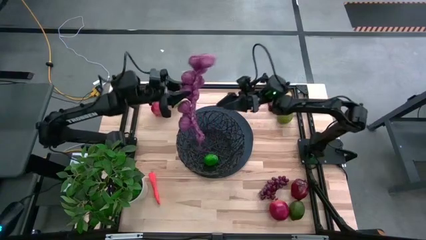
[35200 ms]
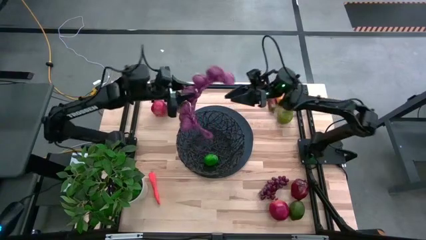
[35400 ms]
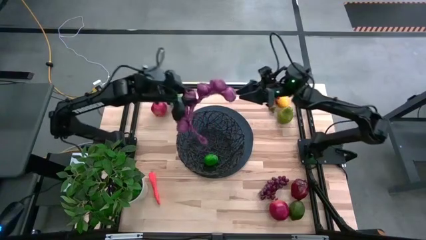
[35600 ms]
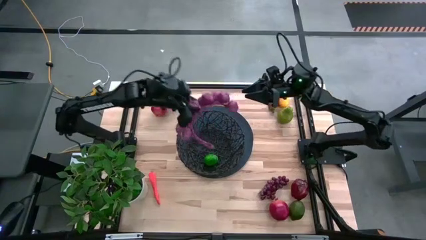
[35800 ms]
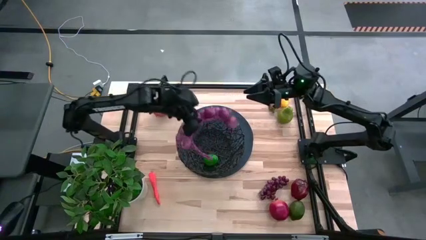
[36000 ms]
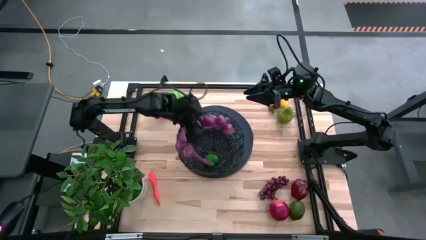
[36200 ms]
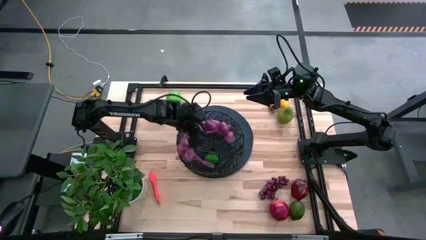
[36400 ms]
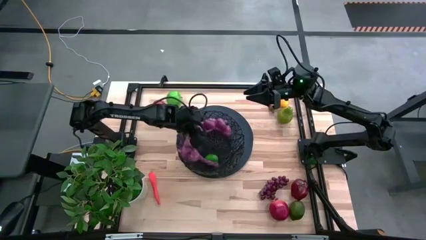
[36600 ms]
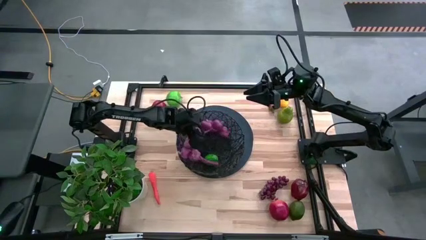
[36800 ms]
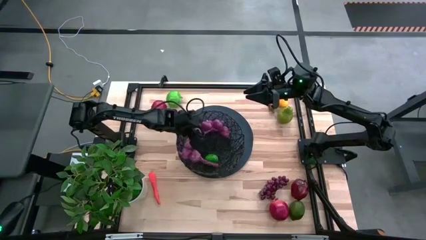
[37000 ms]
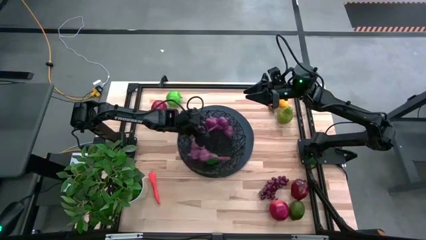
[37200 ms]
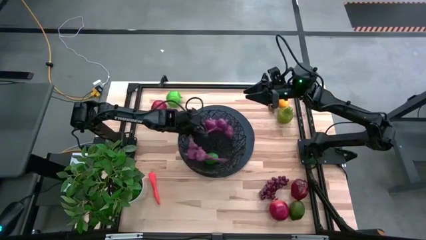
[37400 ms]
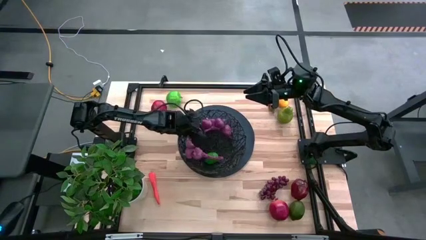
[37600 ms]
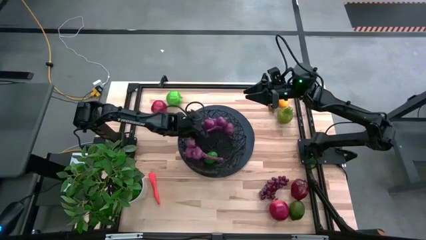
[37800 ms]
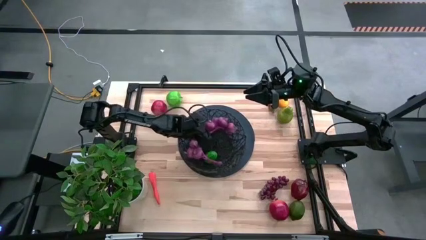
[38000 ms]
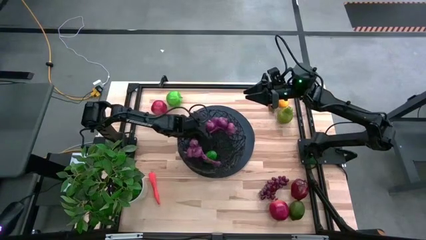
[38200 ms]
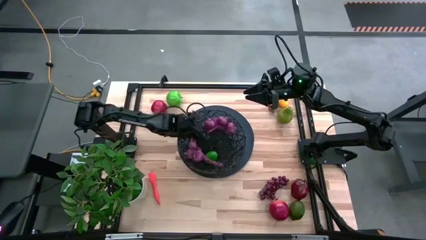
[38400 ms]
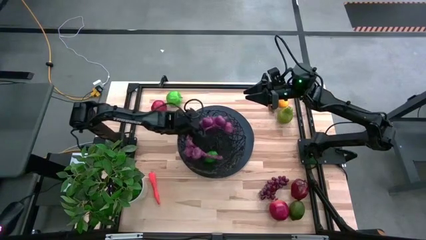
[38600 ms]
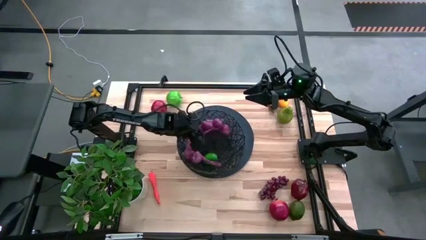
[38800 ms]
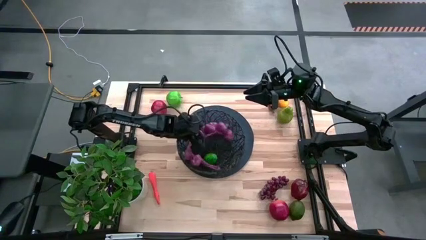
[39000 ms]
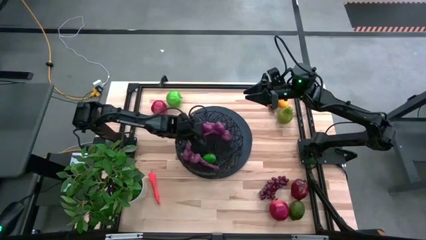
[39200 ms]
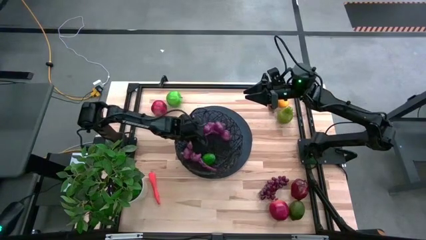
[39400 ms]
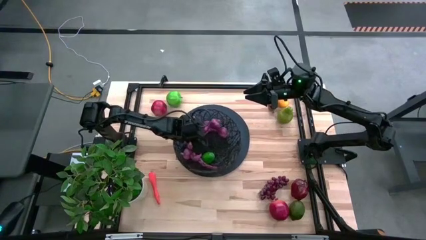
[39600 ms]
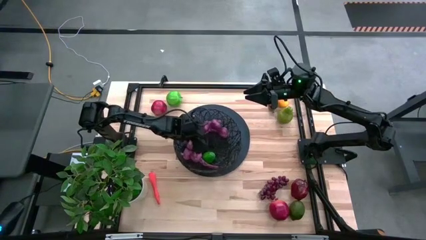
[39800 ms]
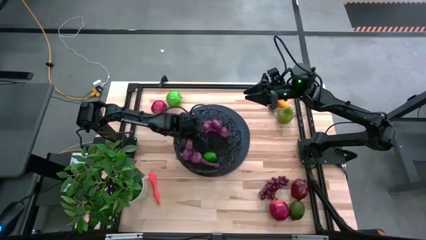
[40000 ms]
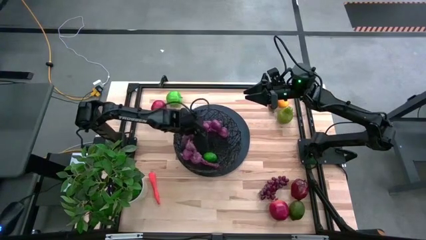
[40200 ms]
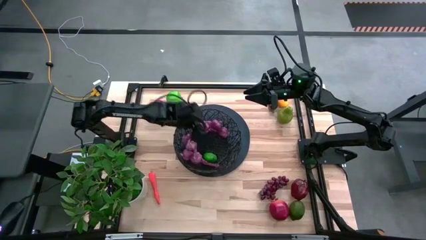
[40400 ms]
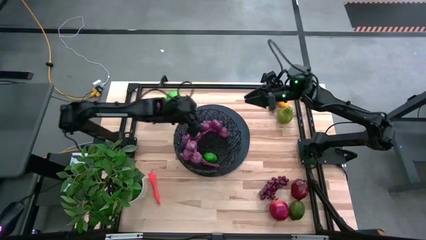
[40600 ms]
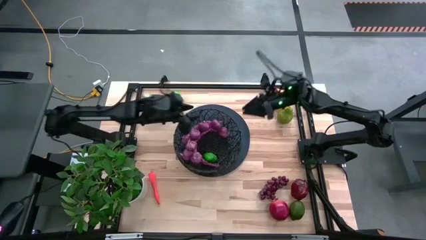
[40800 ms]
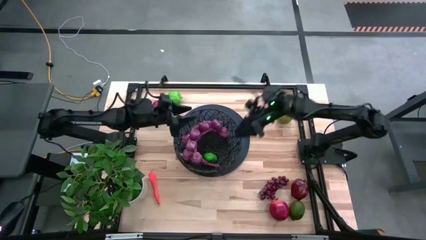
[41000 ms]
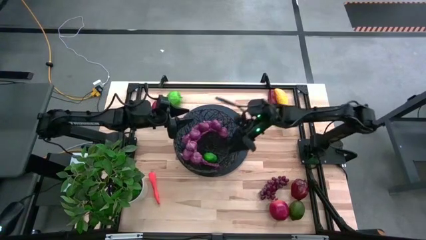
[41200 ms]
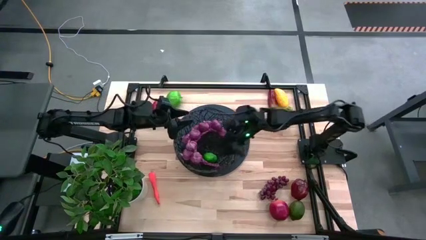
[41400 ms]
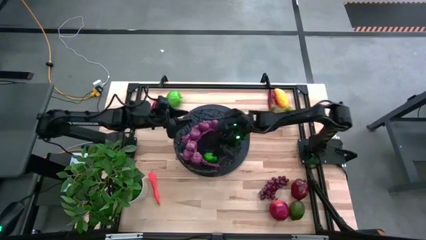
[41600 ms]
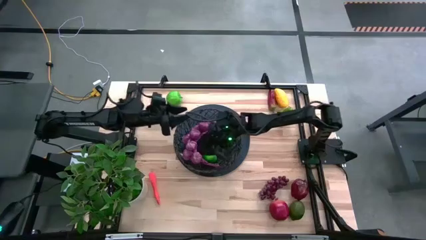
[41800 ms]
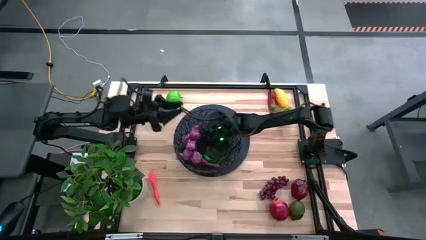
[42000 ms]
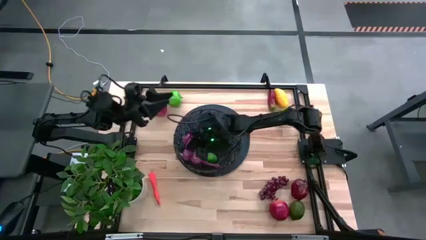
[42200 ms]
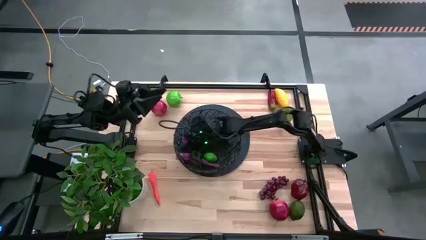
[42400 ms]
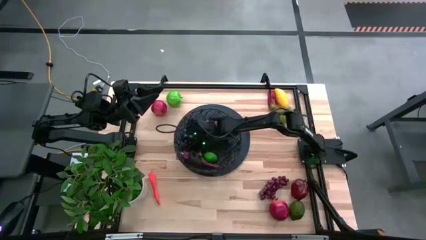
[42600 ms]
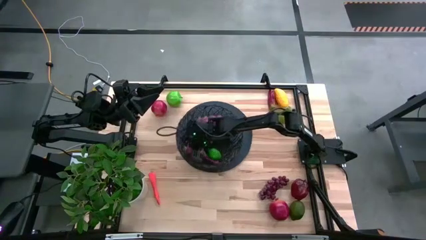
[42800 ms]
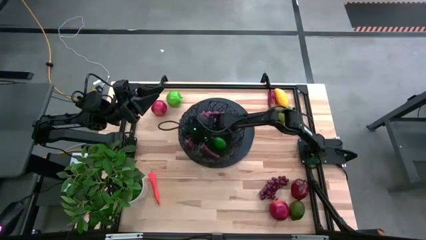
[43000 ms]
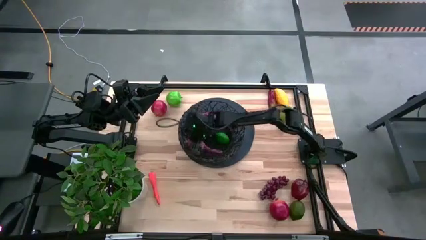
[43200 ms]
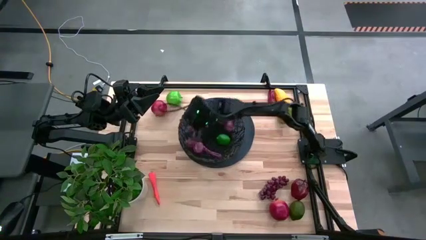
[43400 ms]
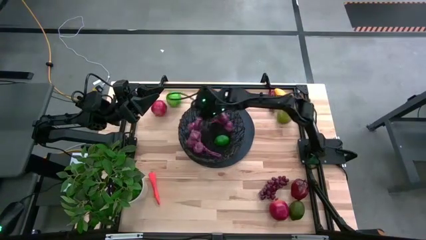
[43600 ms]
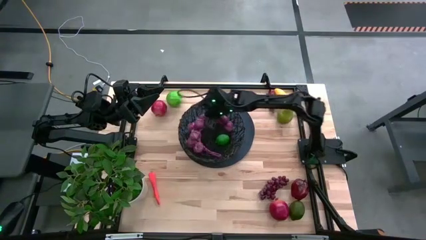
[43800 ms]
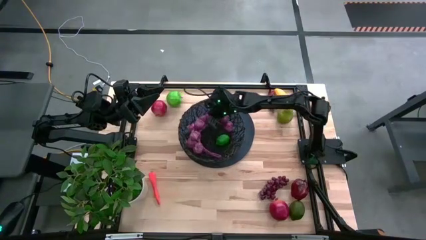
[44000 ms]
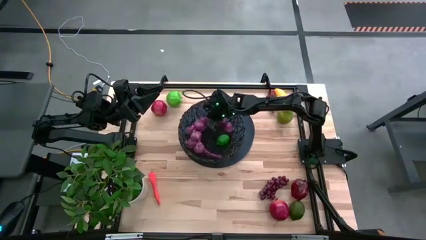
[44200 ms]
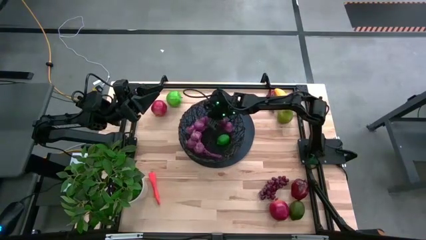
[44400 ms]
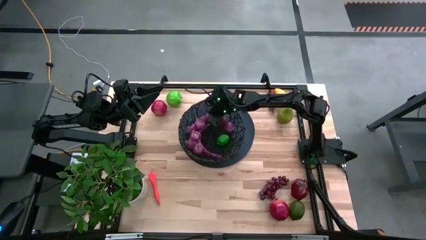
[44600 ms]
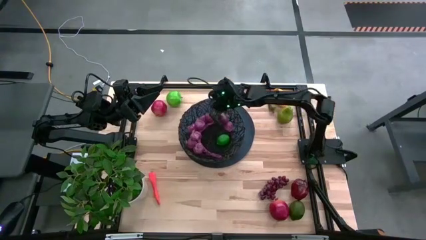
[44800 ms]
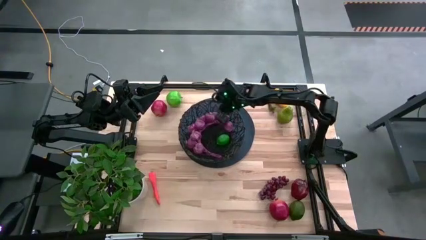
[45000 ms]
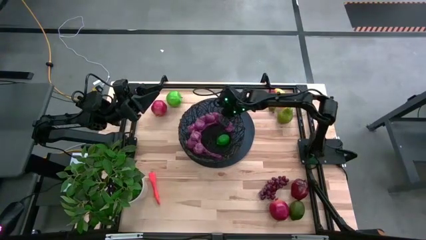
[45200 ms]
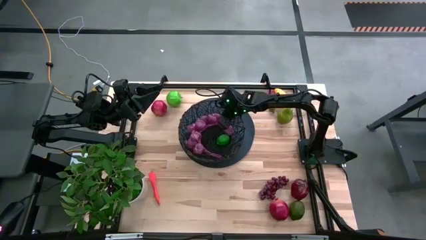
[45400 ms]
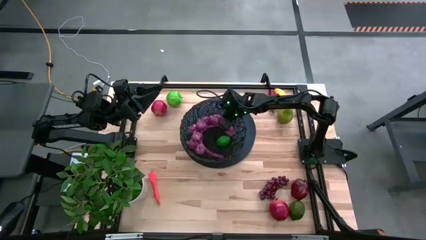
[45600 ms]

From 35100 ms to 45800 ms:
Task: Build produce basket
Adjust the purple garlic into basket
